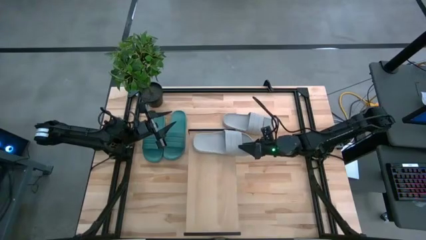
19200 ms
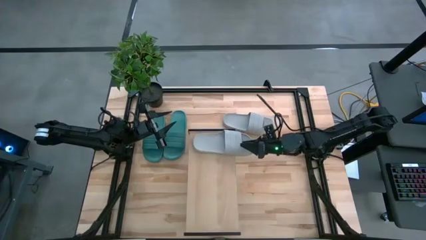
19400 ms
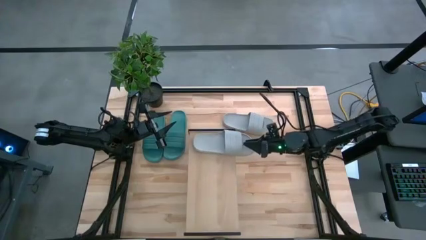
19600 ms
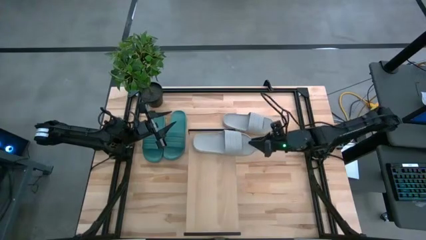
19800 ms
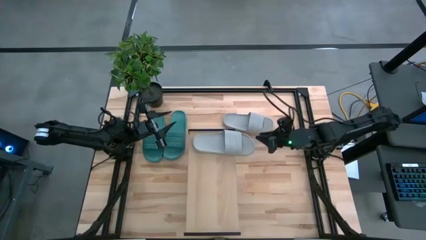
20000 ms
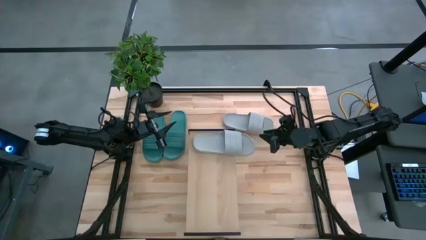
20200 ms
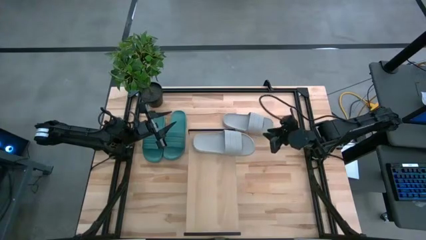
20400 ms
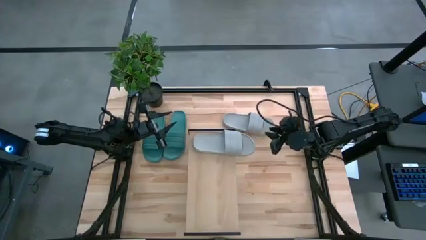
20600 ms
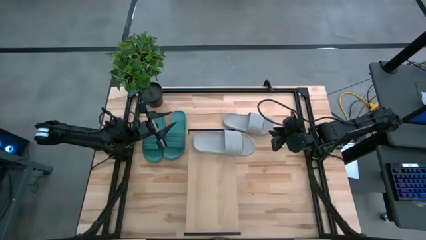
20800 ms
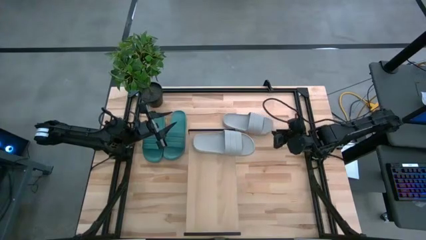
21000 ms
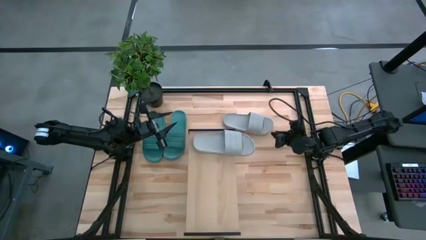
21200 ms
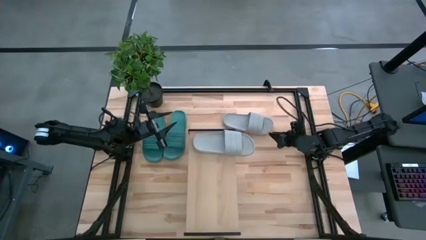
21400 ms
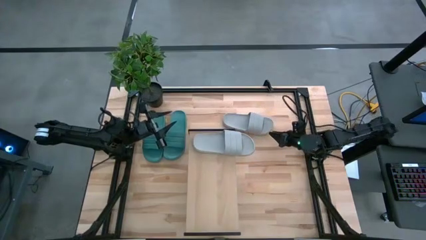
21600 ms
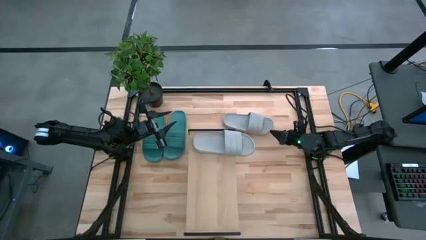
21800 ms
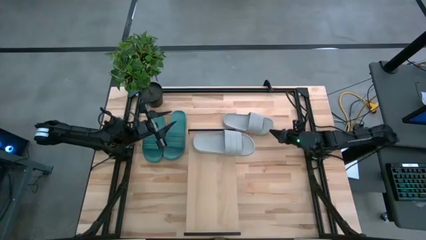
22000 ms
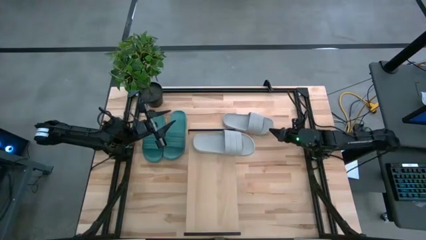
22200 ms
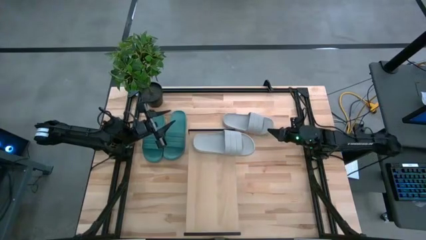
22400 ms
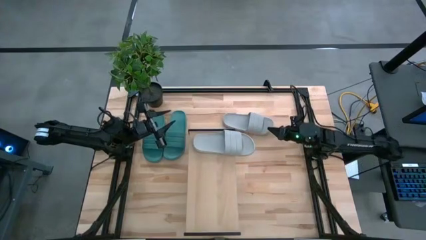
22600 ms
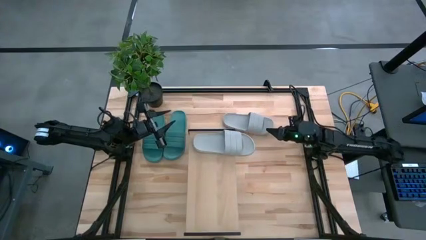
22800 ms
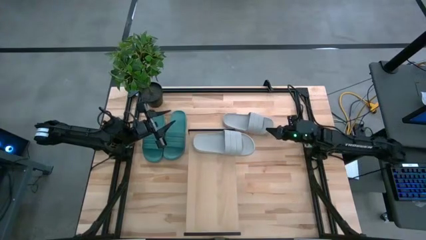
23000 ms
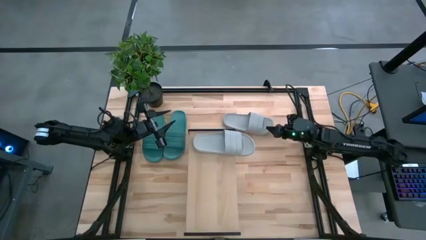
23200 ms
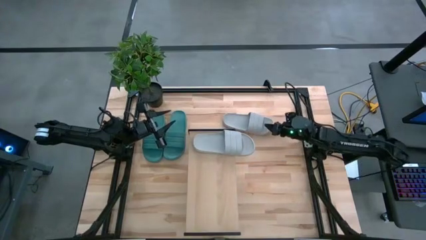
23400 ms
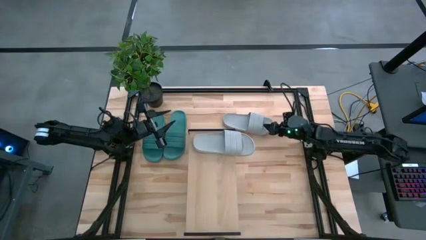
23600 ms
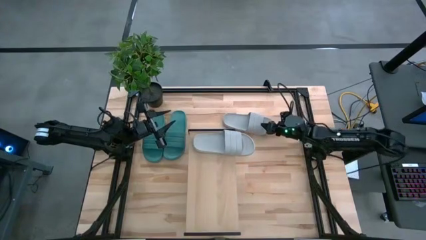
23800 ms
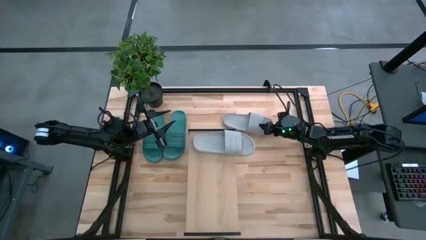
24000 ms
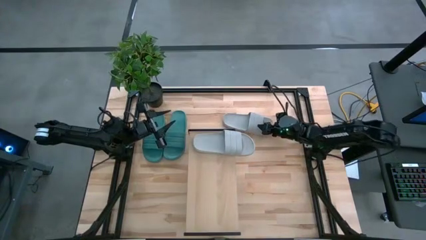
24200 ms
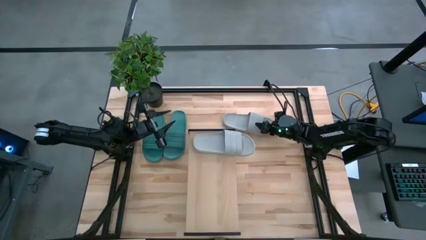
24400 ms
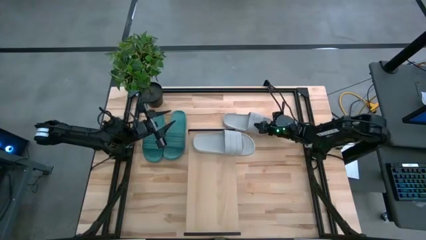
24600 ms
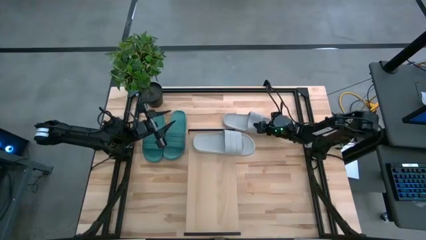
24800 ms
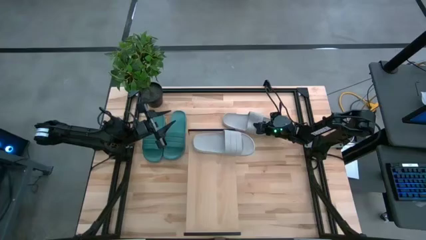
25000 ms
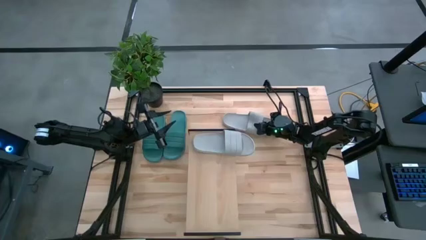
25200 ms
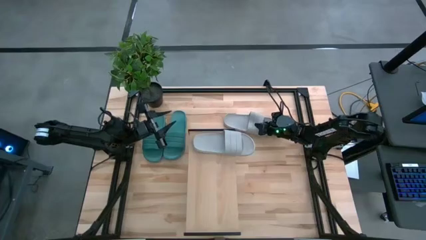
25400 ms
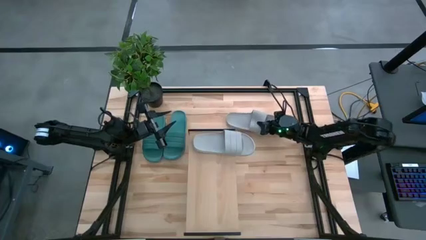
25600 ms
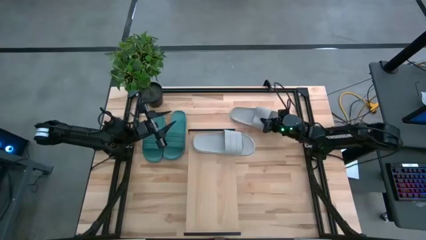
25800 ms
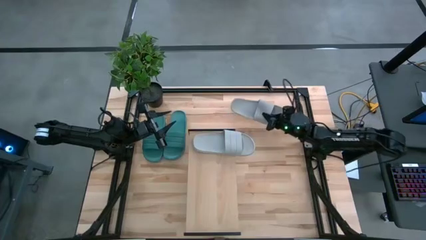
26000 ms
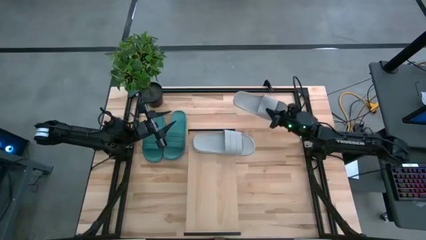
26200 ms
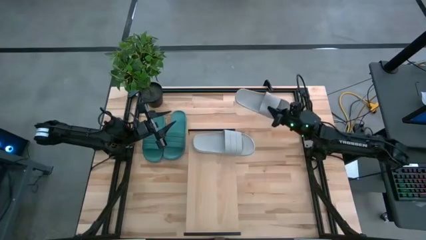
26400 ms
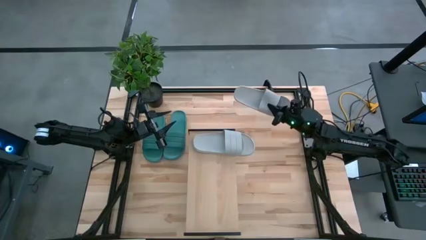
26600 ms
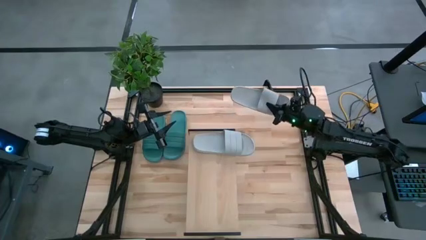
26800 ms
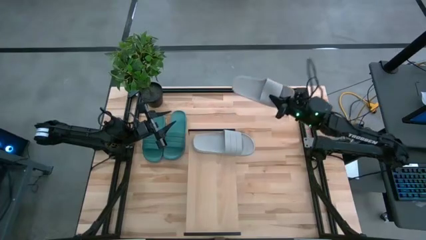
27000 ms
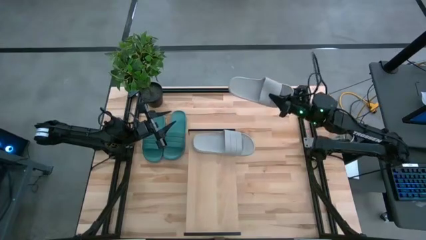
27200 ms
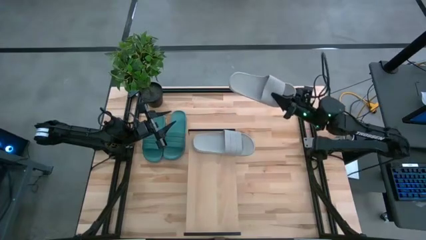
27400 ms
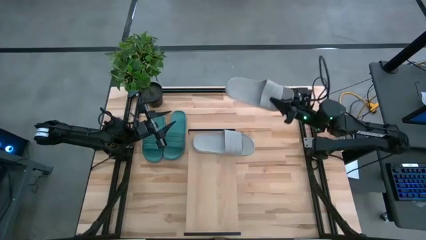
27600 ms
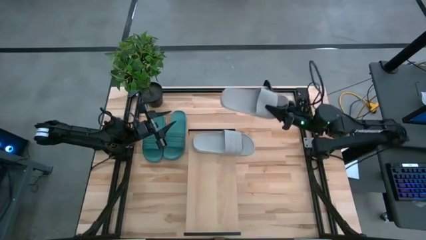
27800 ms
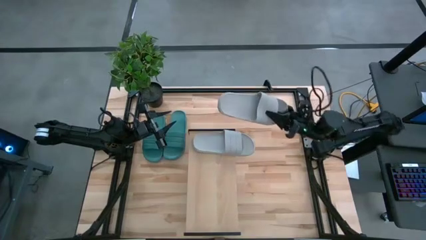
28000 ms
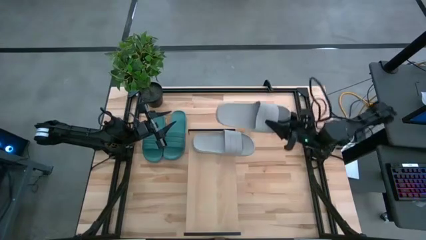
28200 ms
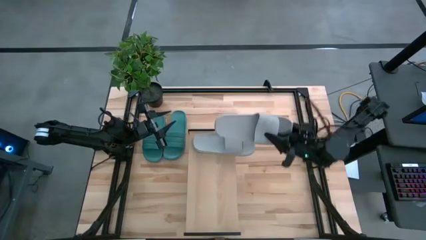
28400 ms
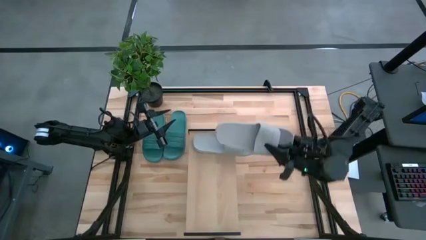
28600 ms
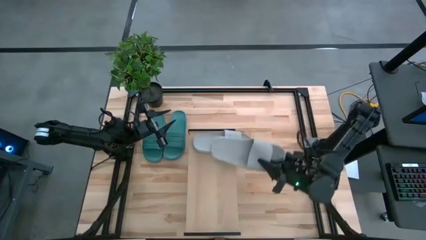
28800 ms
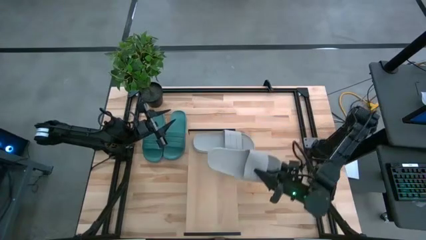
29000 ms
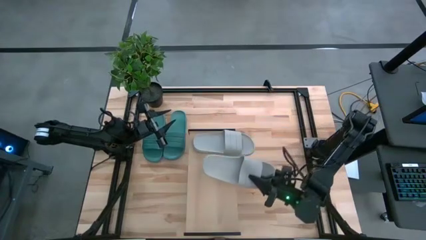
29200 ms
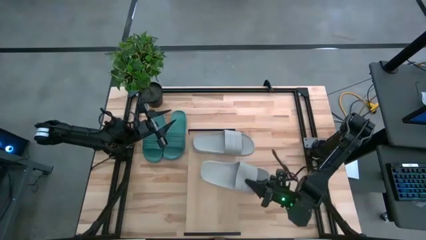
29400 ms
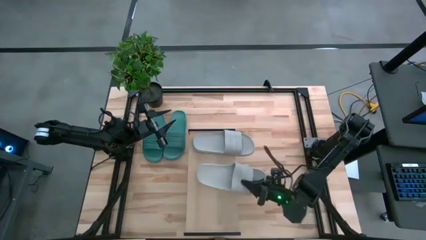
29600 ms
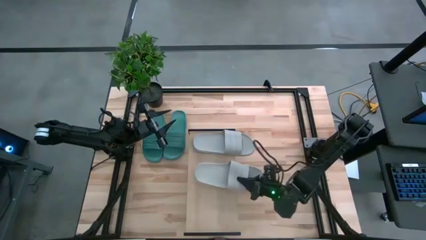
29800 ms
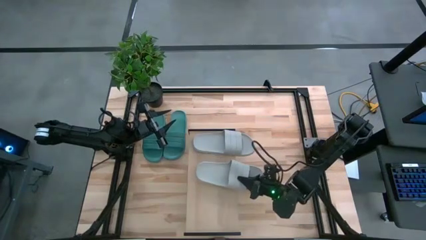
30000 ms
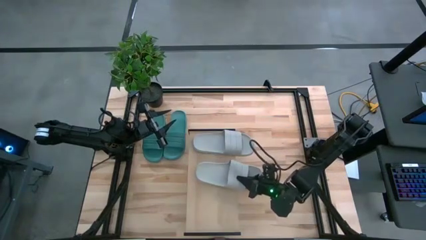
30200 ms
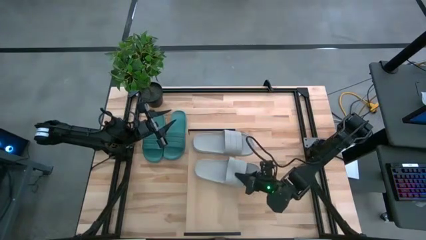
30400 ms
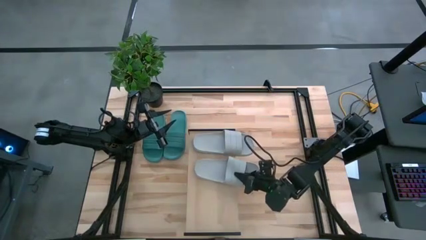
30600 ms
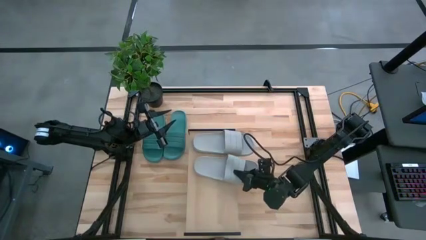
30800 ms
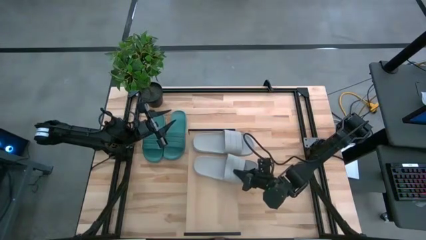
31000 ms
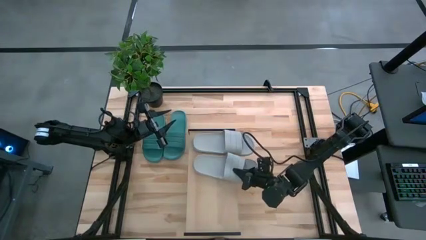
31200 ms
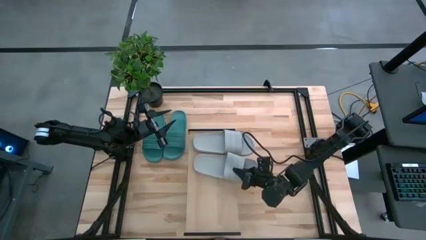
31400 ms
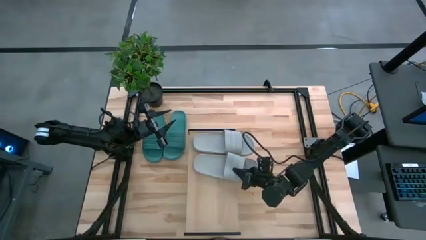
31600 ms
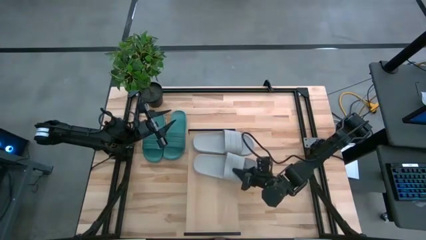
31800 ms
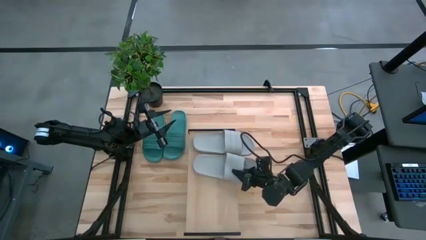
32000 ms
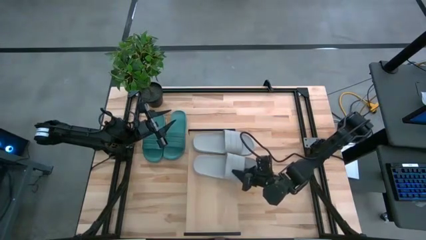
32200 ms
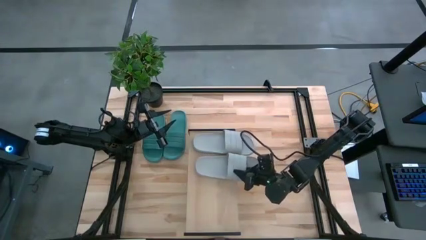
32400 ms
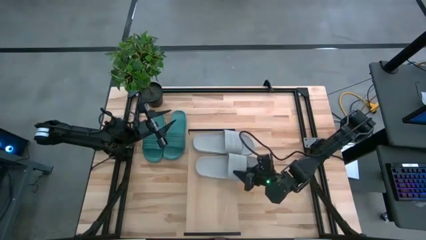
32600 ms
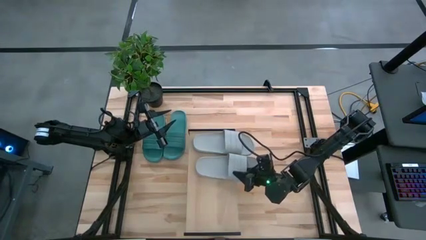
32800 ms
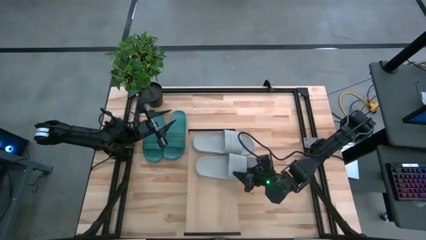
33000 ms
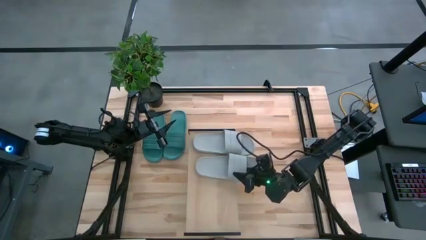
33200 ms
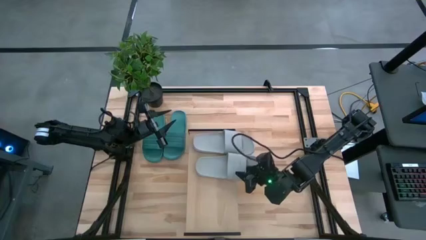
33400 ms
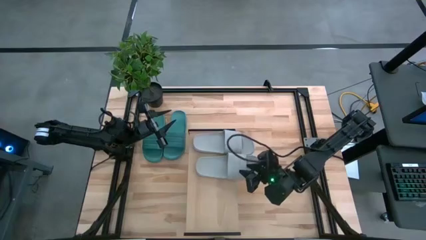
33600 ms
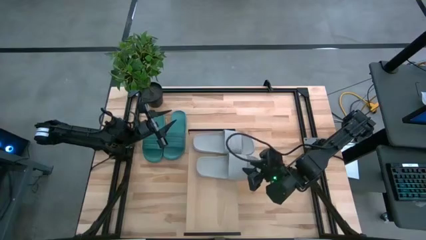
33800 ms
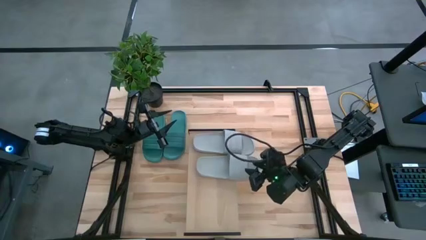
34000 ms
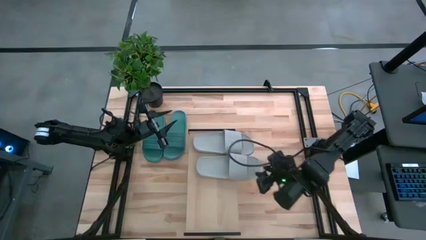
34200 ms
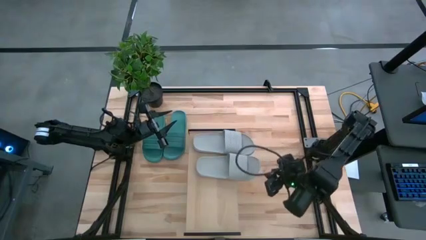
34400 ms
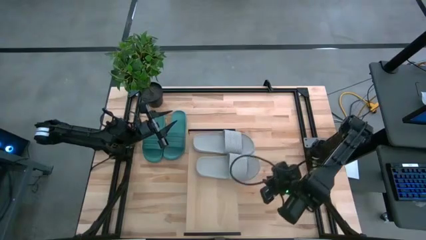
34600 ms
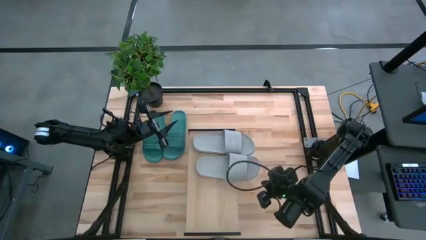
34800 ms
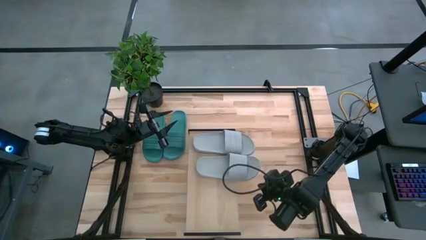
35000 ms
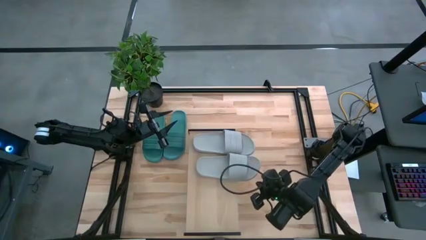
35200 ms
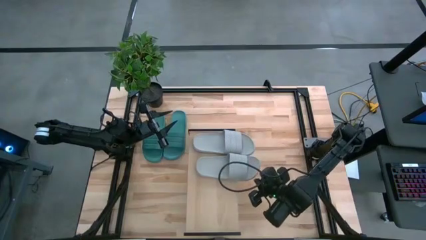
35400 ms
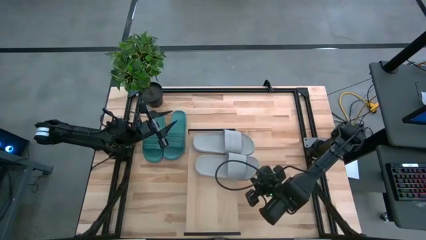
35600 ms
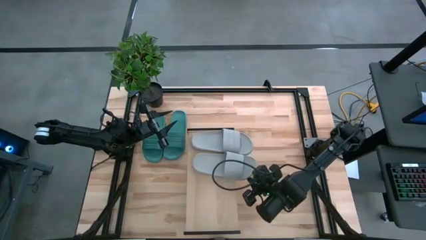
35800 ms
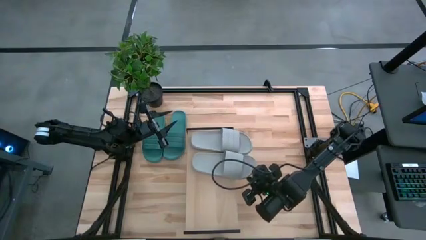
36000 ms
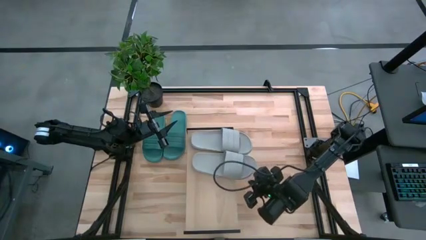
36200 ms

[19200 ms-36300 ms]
Task: Pick and place slides into the shelf
Put the gray slipper on the shelf
